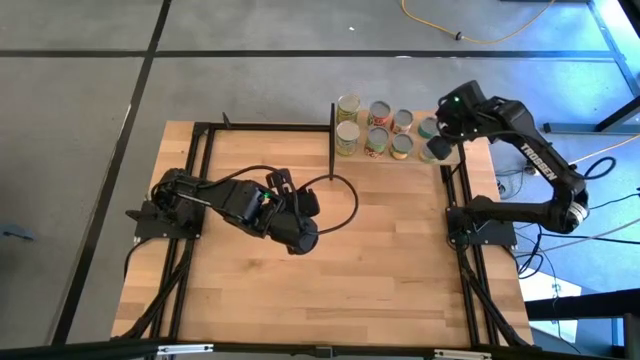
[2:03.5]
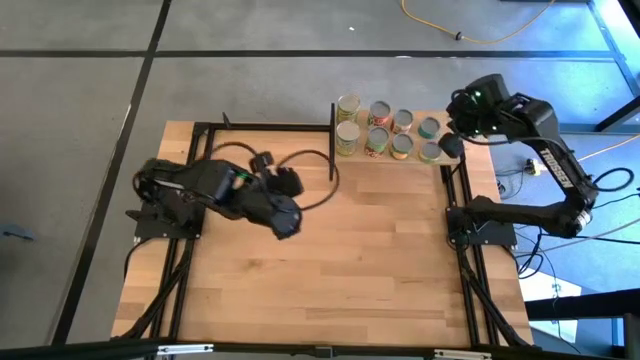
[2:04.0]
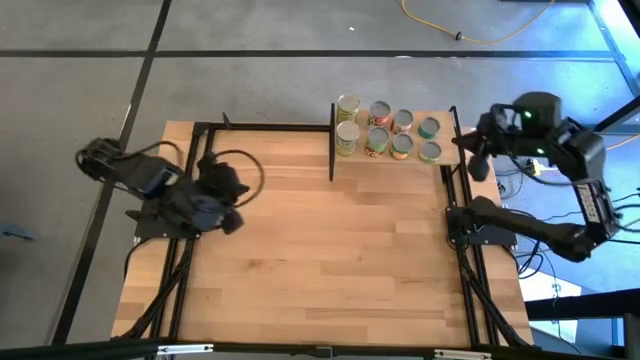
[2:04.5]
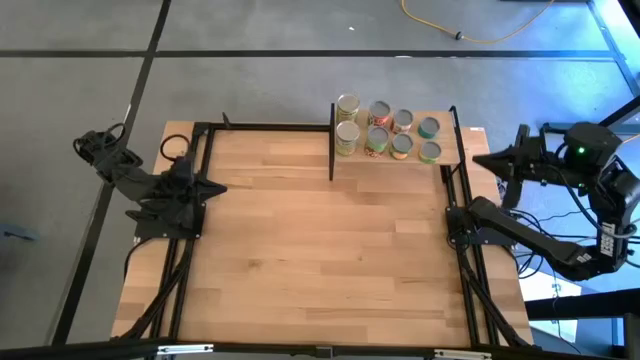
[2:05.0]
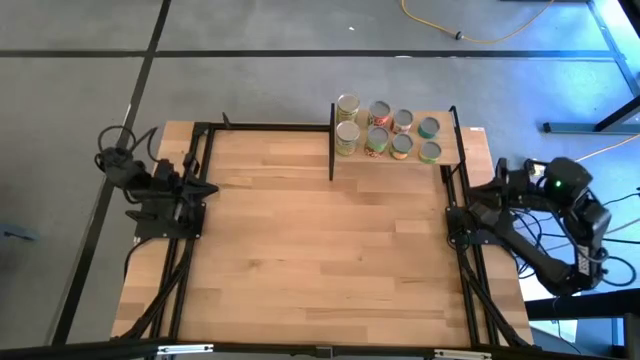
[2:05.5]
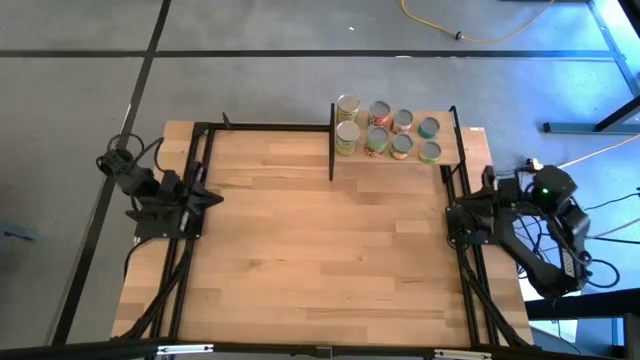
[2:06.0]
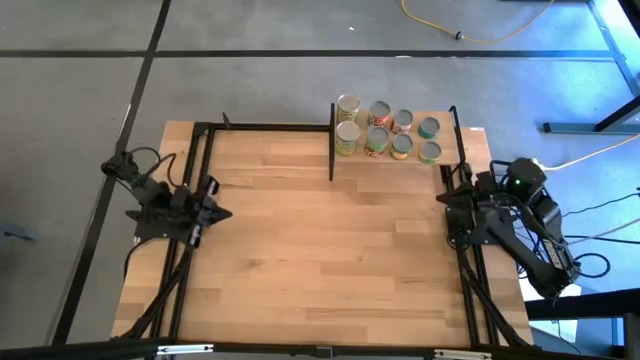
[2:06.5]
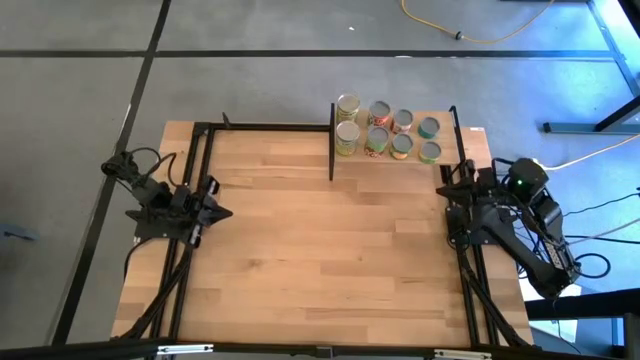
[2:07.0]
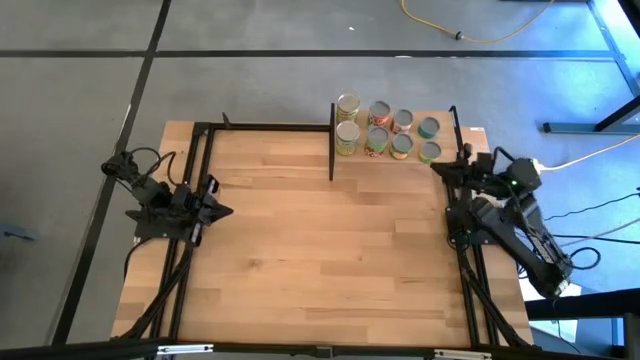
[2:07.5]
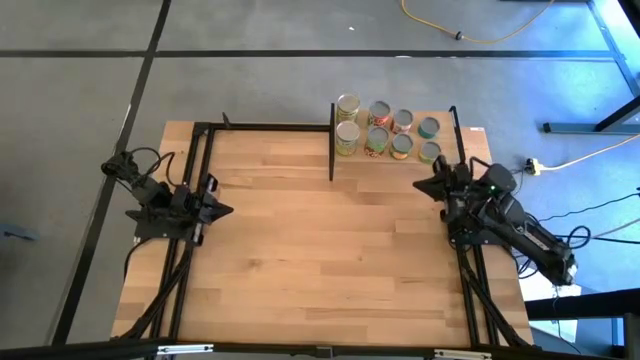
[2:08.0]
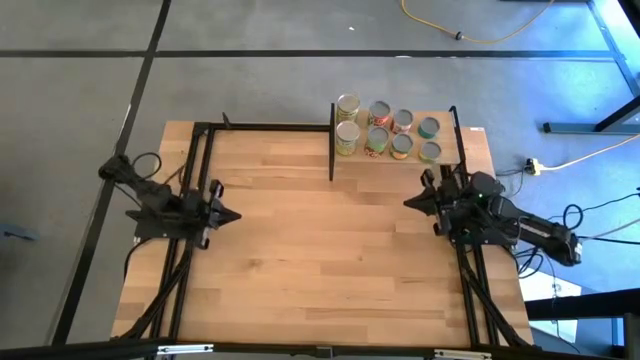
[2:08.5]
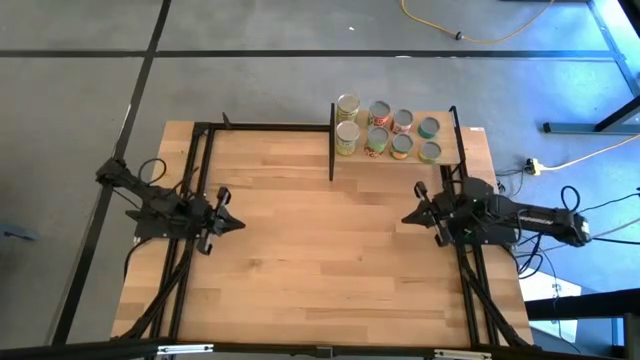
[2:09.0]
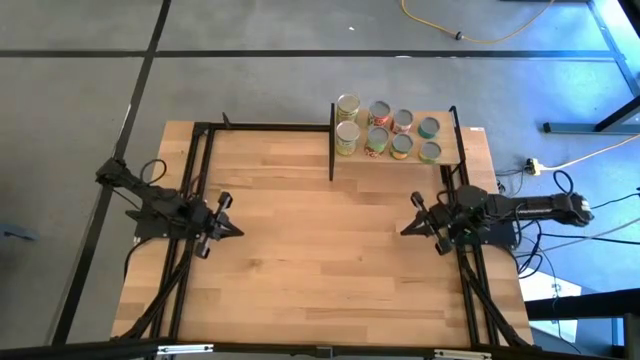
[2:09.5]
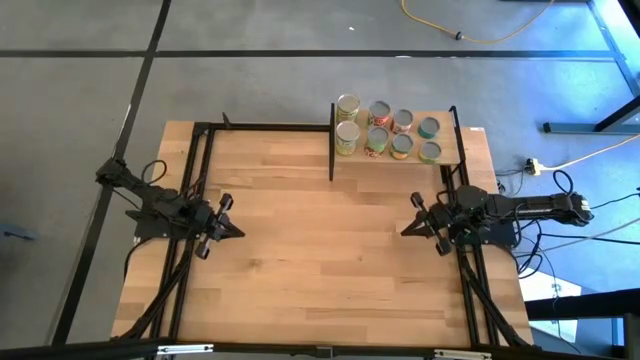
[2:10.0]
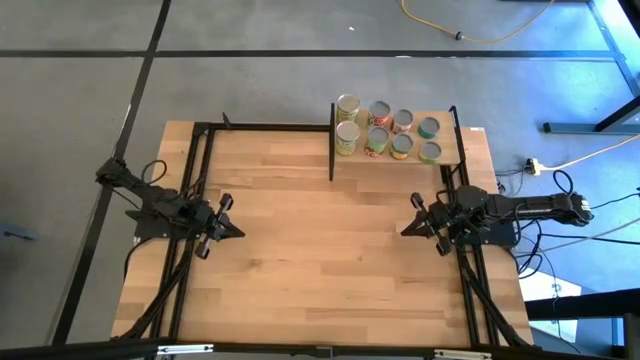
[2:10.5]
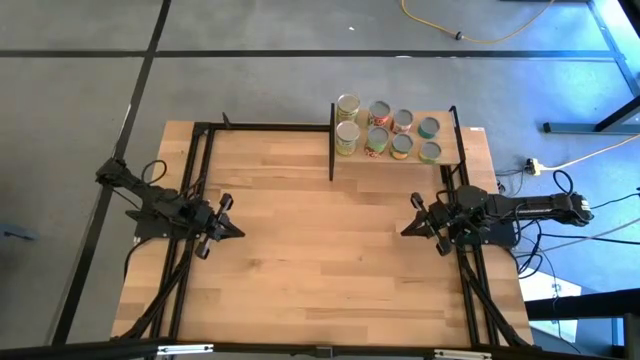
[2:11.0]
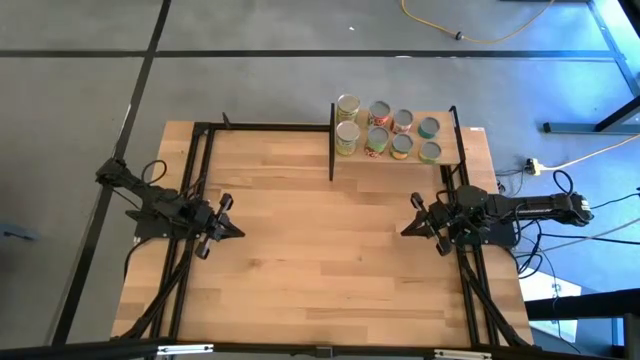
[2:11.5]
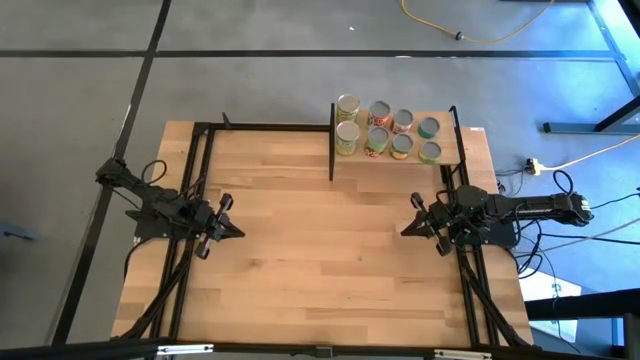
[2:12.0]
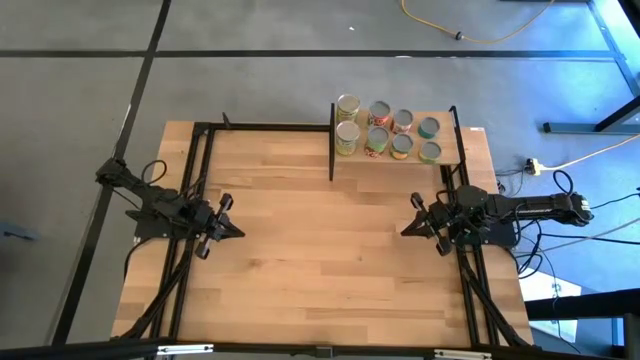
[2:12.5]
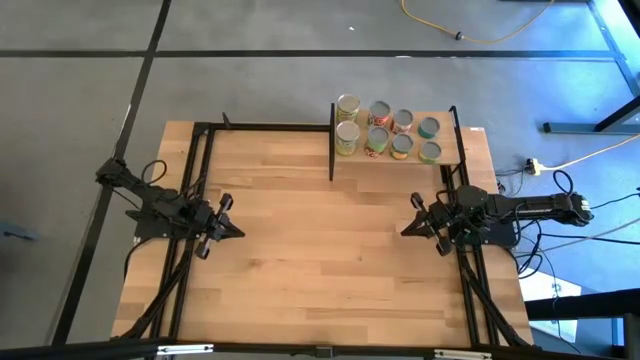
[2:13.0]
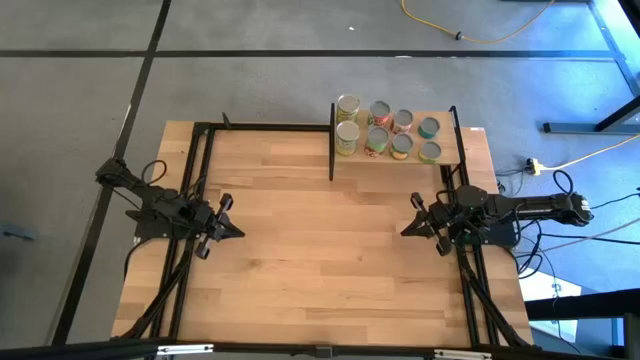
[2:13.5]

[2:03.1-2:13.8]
Task: Pick and place cans onto a shelf
Return to Home Position

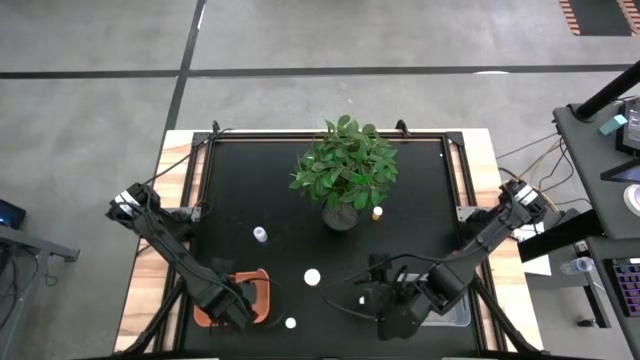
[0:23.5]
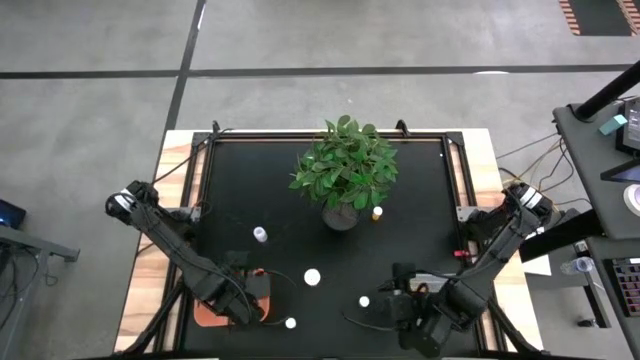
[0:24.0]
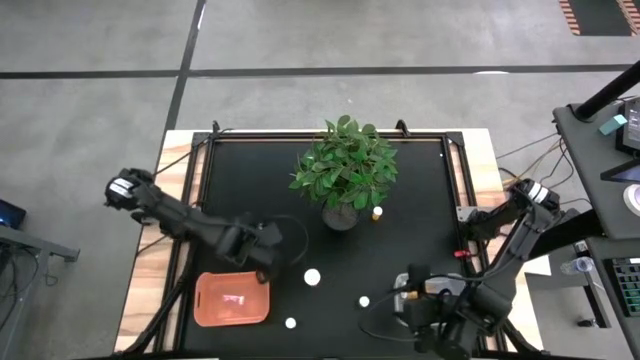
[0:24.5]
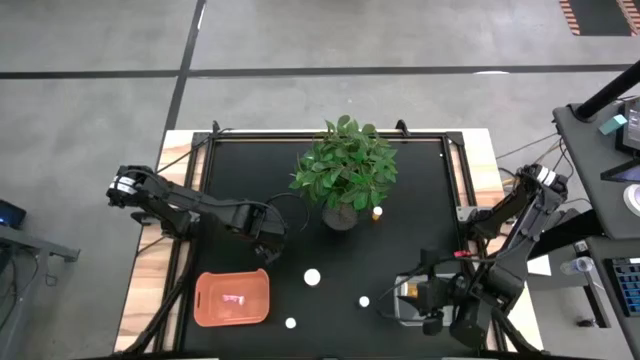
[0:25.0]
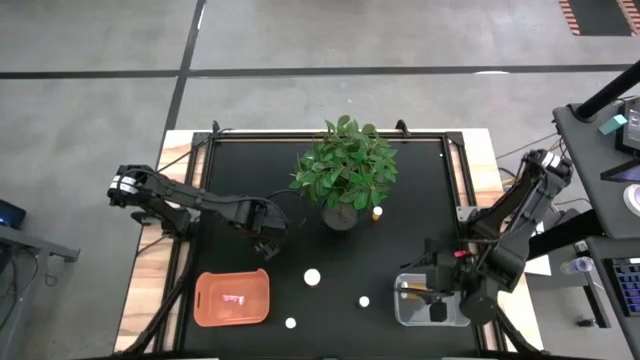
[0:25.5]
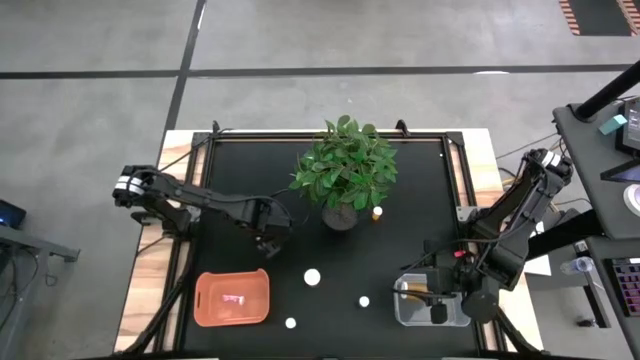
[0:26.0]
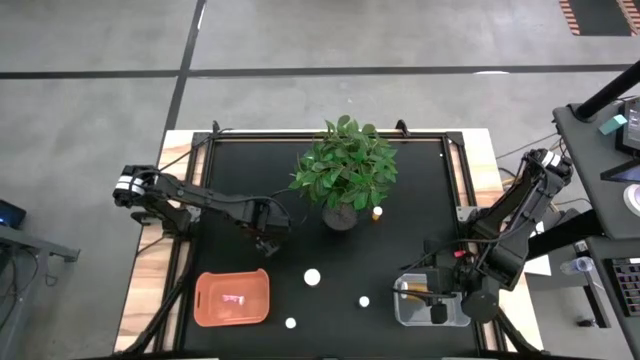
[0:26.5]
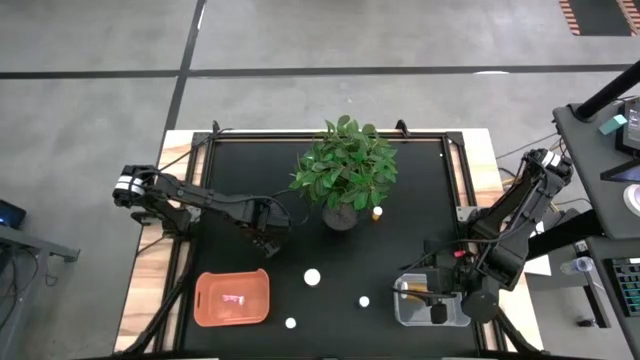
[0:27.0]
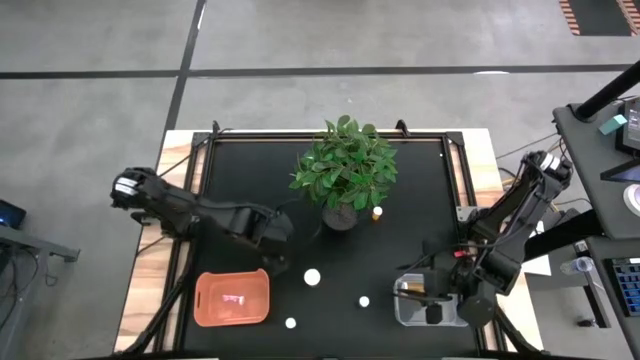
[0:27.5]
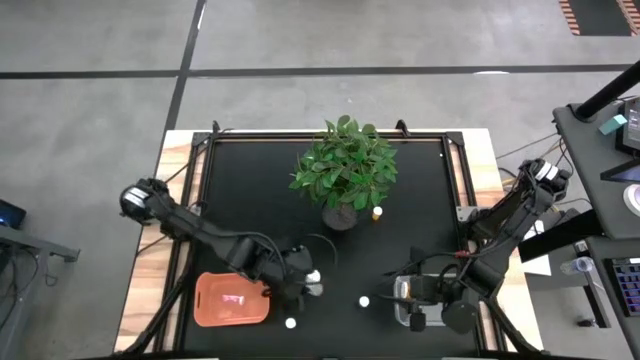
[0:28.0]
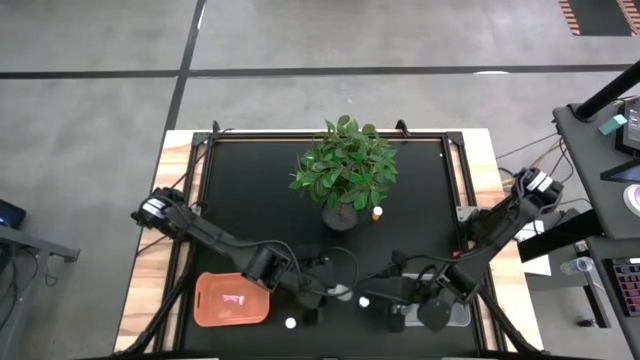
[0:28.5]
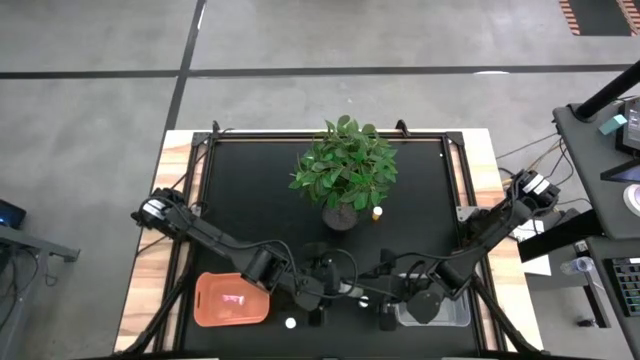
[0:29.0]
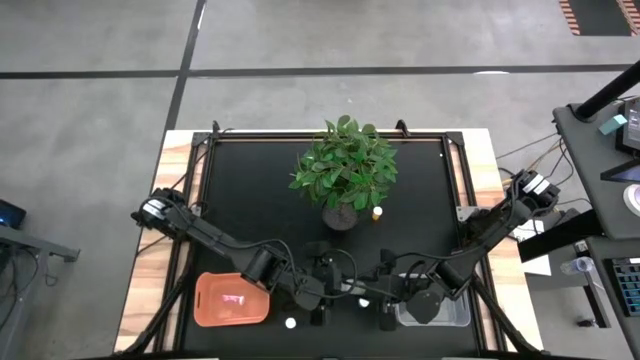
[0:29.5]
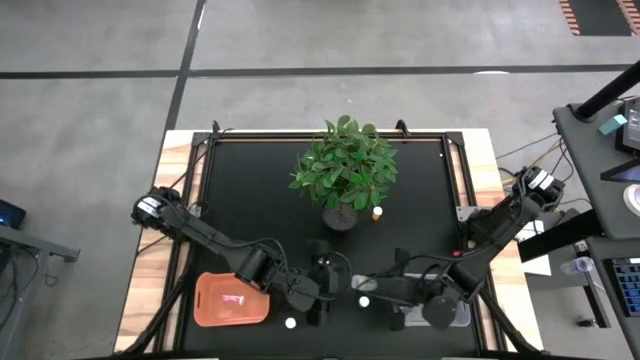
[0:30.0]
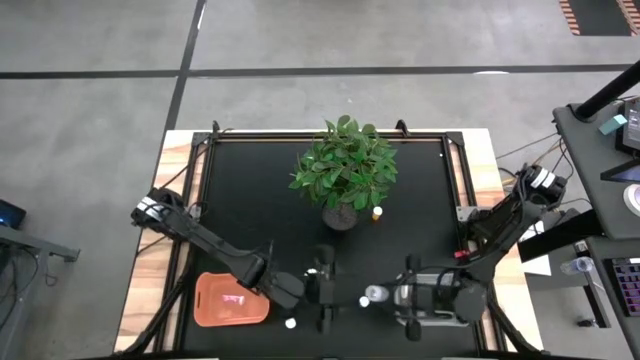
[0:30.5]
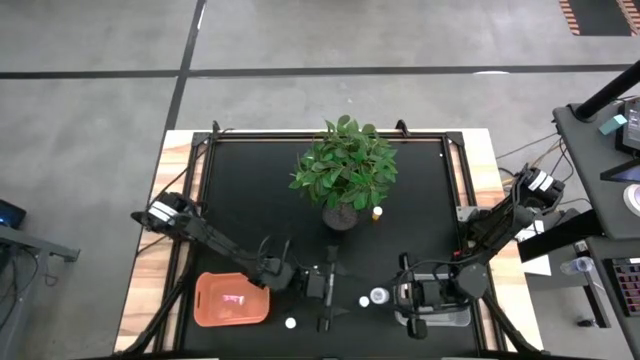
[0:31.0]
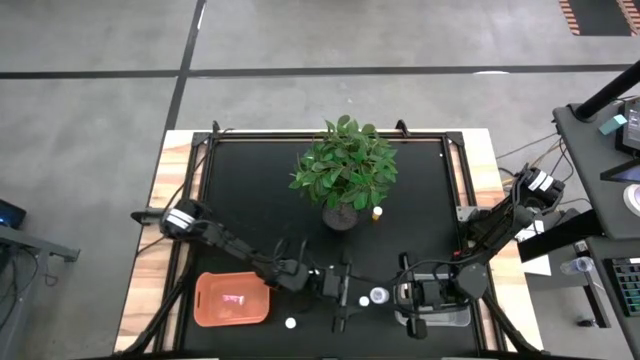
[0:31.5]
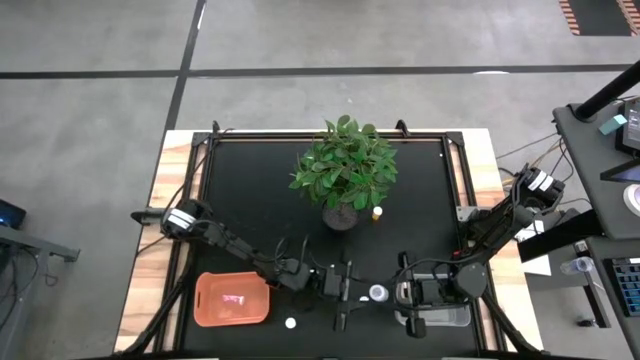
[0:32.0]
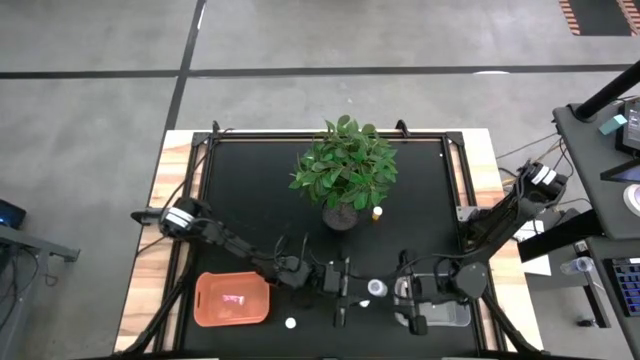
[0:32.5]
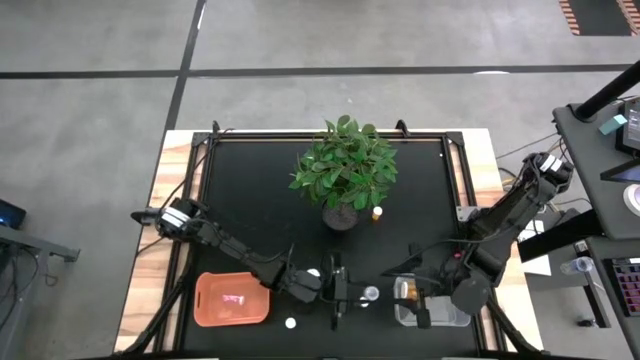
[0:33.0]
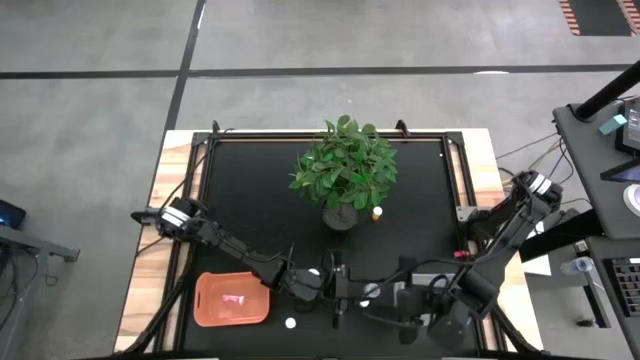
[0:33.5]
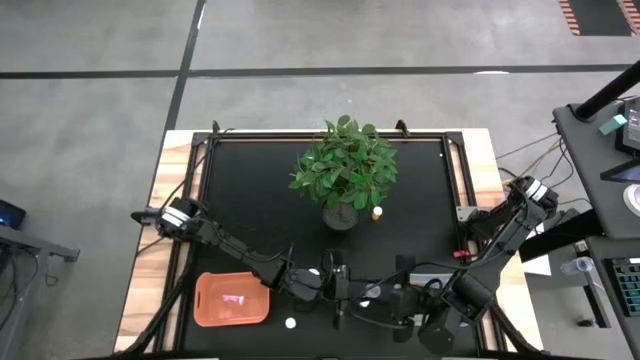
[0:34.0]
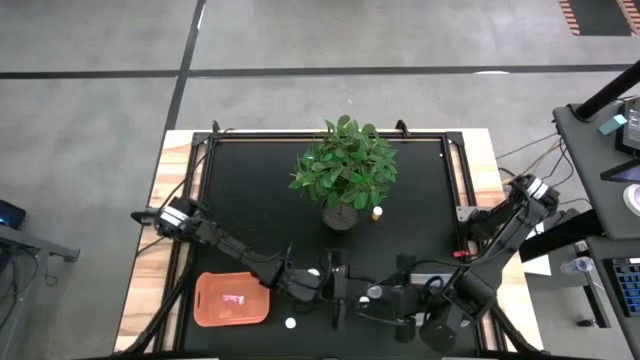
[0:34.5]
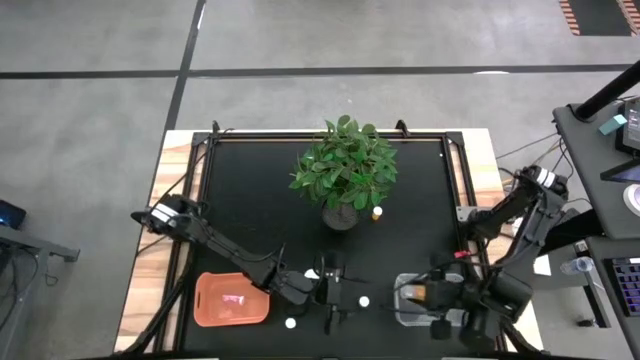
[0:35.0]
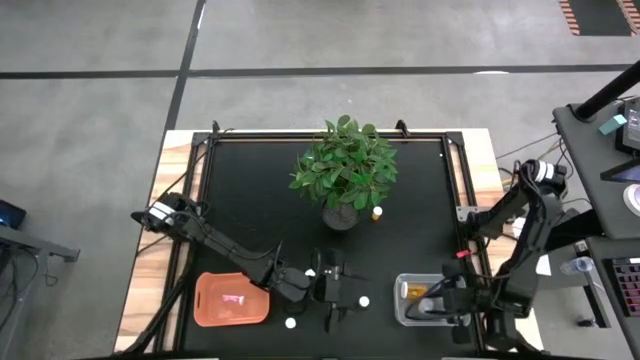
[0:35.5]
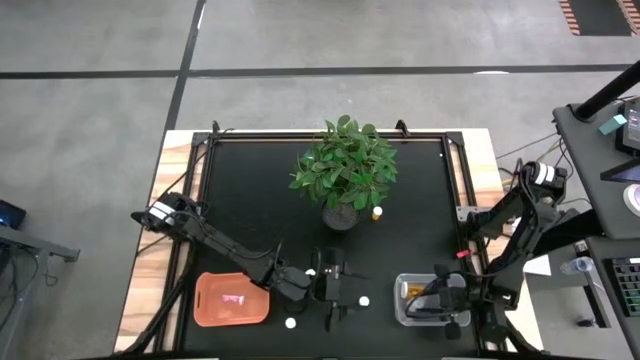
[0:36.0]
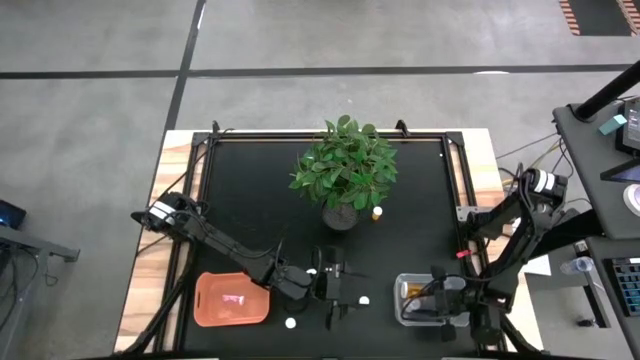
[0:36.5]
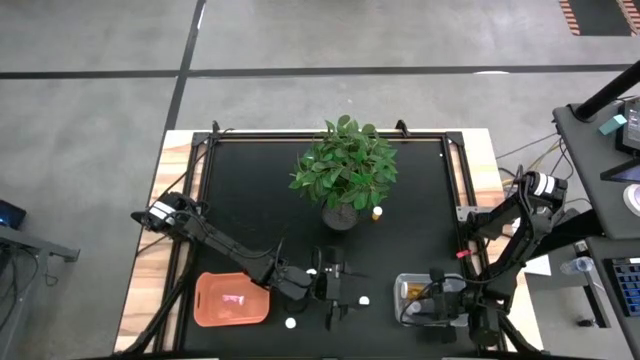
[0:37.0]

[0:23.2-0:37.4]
Task: Pick and place medicine bottles into bin by pill shape (circle, oval)
Put the transparent capsule bottle into the transparent bin
